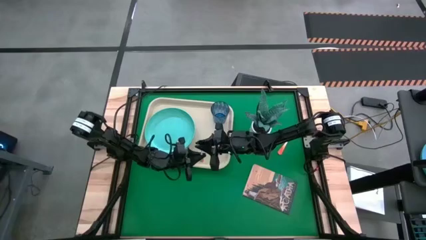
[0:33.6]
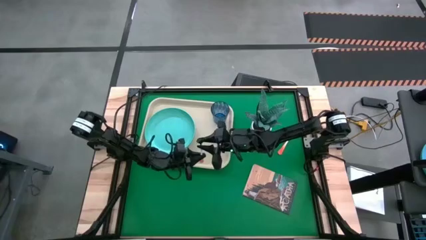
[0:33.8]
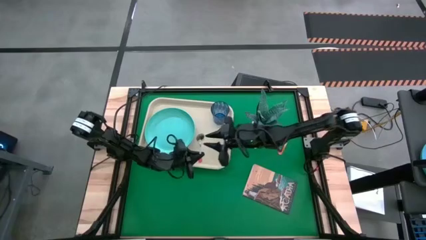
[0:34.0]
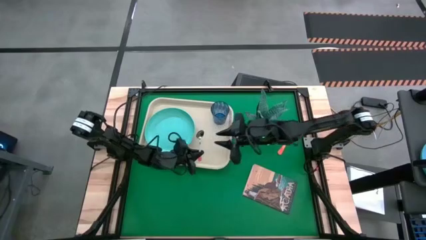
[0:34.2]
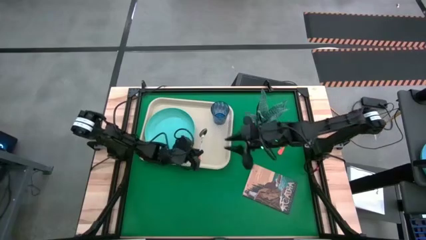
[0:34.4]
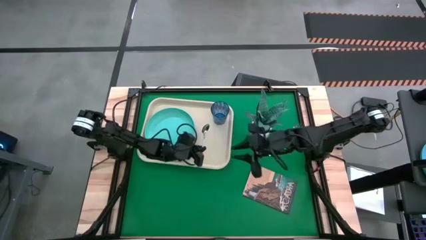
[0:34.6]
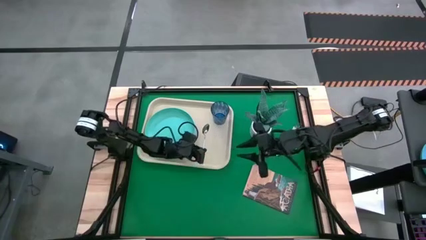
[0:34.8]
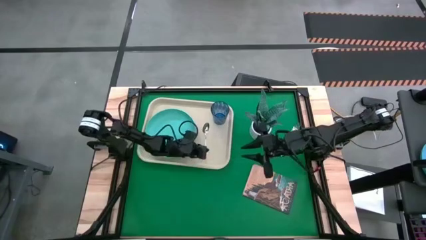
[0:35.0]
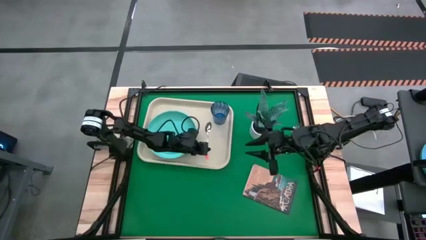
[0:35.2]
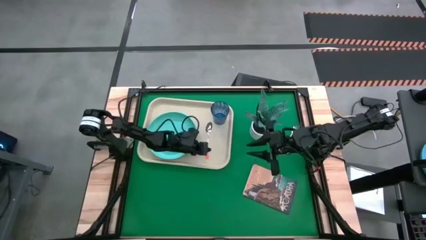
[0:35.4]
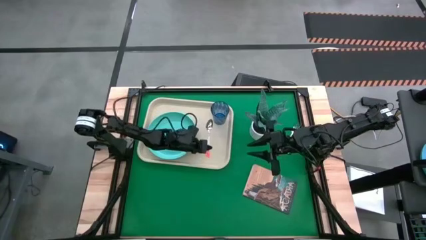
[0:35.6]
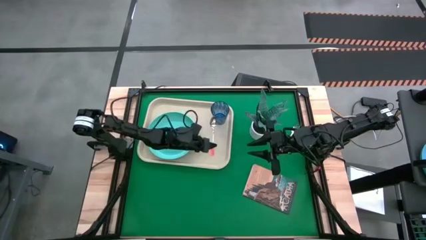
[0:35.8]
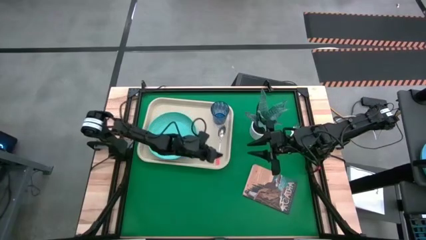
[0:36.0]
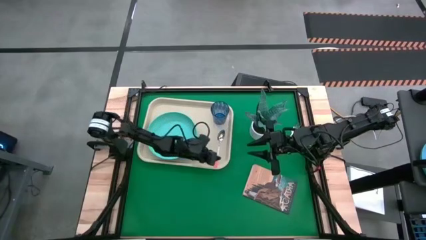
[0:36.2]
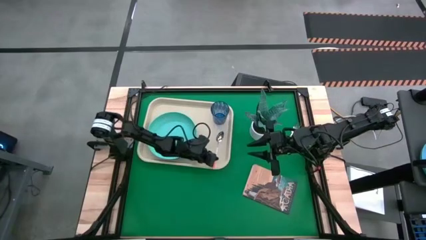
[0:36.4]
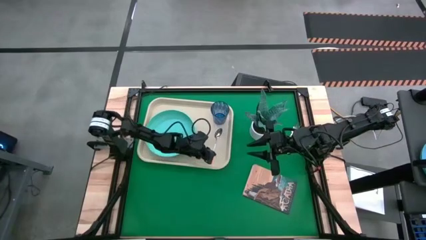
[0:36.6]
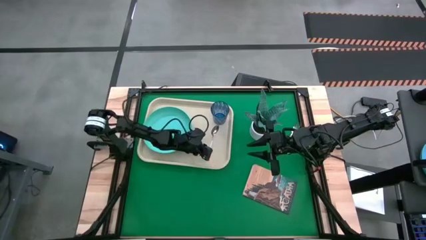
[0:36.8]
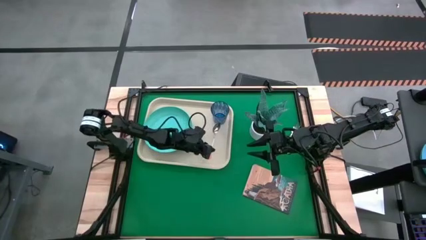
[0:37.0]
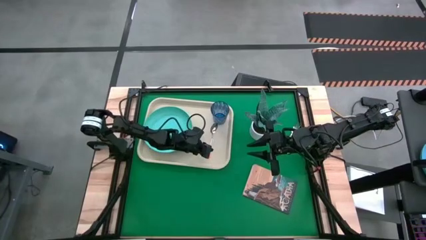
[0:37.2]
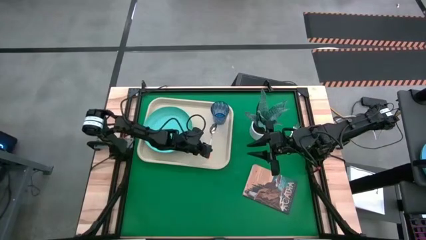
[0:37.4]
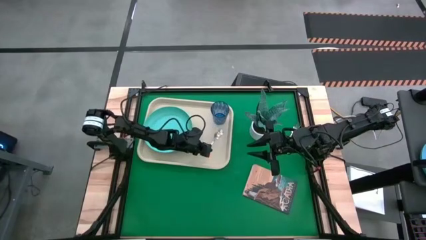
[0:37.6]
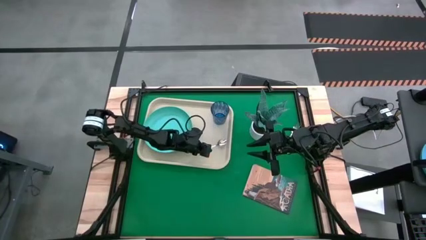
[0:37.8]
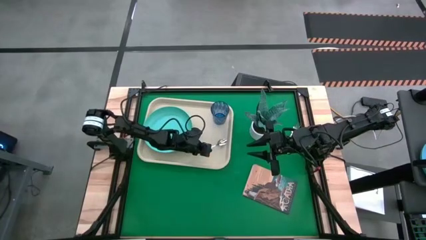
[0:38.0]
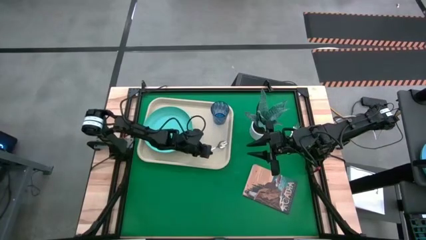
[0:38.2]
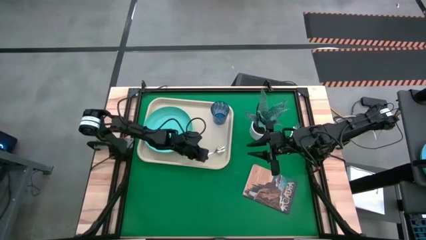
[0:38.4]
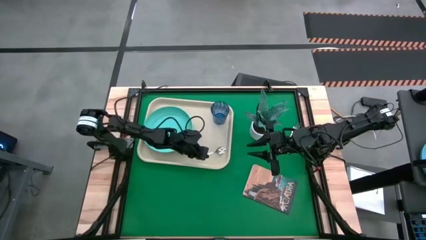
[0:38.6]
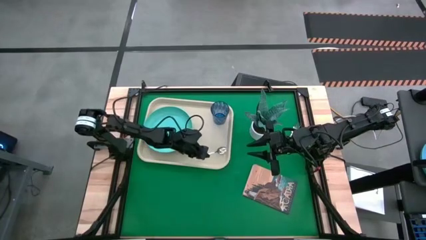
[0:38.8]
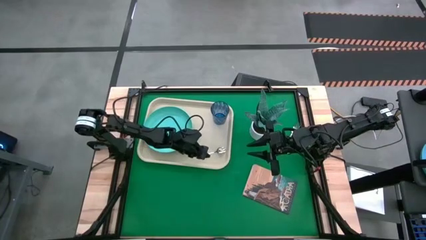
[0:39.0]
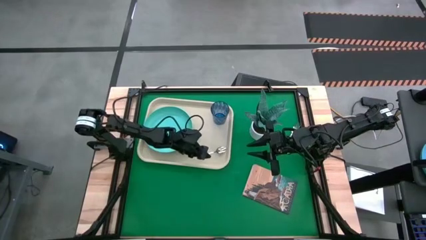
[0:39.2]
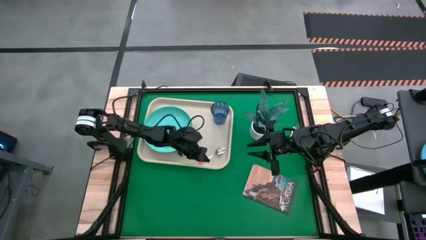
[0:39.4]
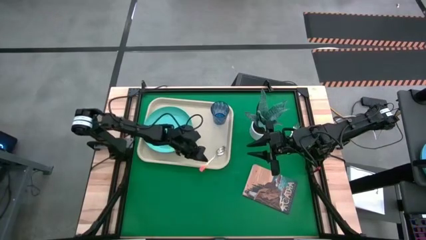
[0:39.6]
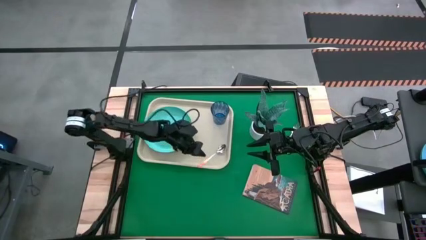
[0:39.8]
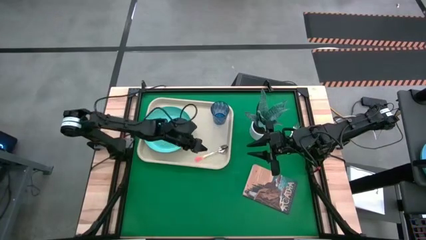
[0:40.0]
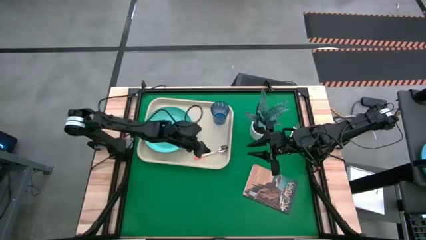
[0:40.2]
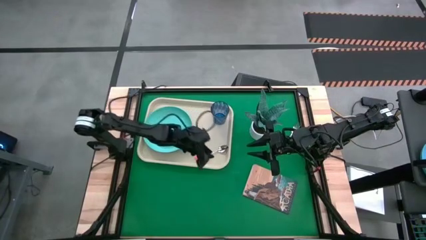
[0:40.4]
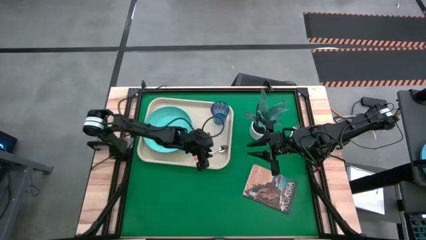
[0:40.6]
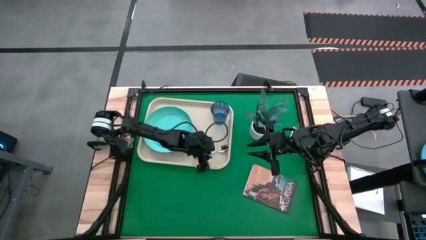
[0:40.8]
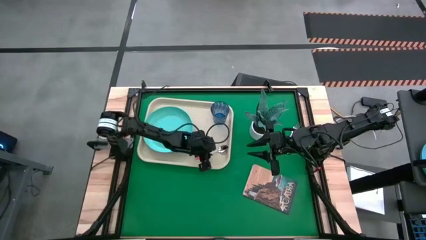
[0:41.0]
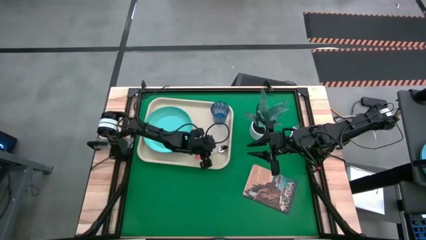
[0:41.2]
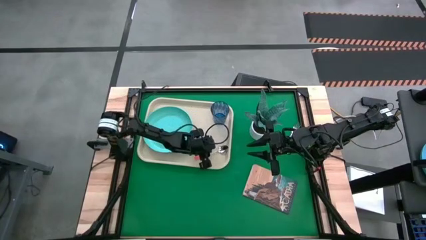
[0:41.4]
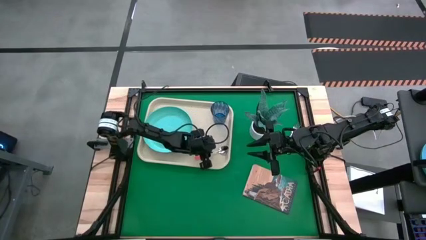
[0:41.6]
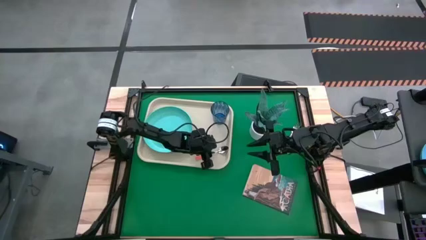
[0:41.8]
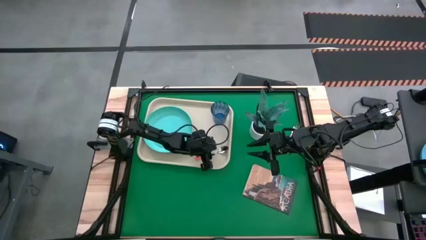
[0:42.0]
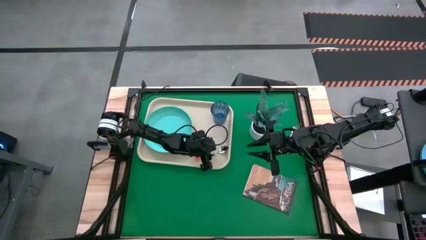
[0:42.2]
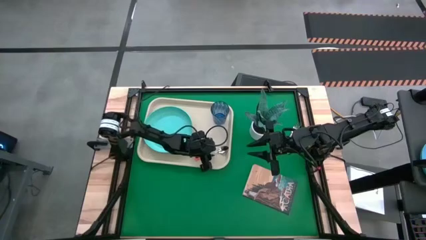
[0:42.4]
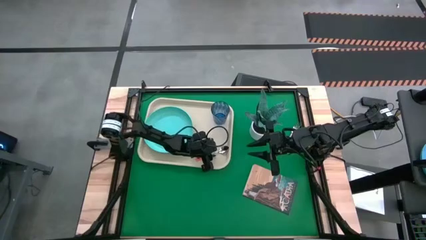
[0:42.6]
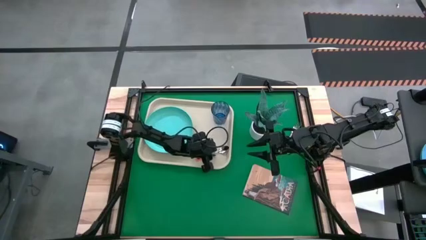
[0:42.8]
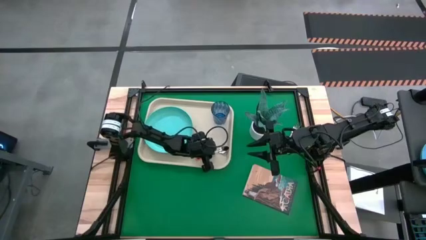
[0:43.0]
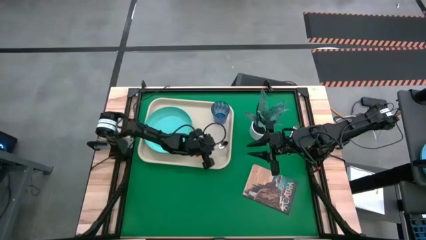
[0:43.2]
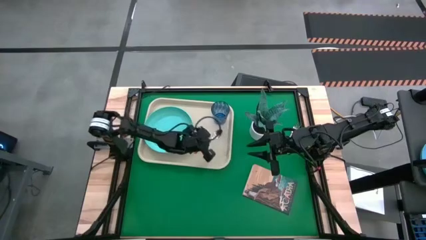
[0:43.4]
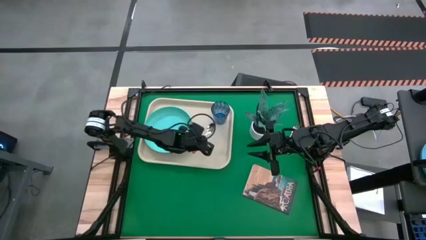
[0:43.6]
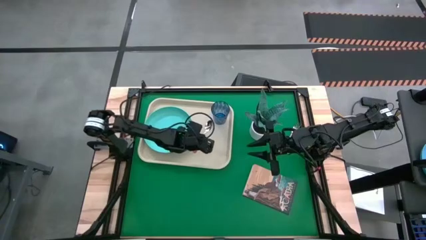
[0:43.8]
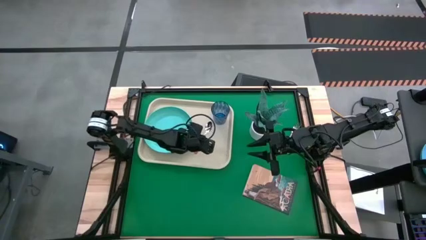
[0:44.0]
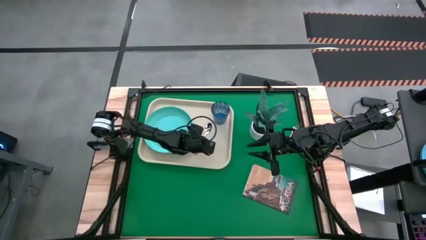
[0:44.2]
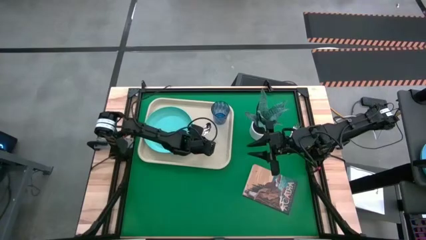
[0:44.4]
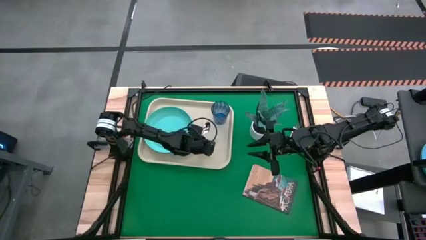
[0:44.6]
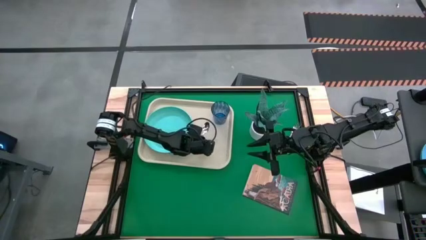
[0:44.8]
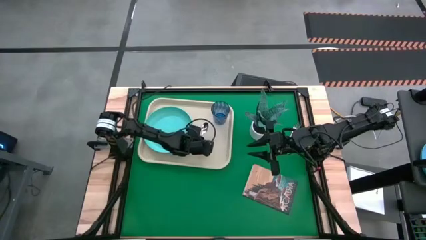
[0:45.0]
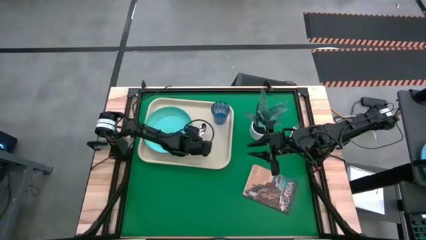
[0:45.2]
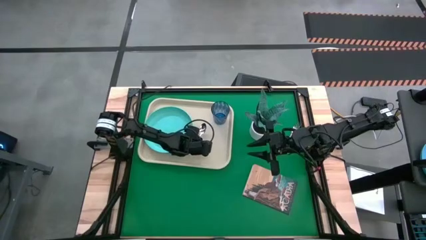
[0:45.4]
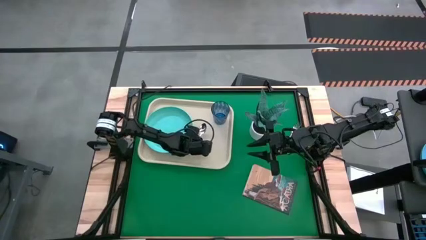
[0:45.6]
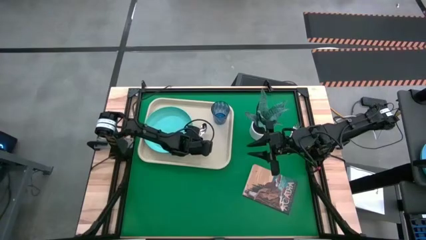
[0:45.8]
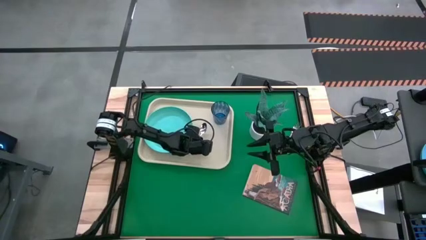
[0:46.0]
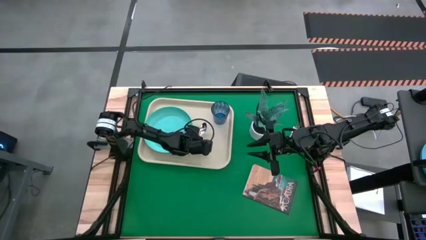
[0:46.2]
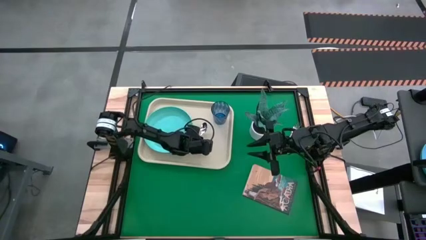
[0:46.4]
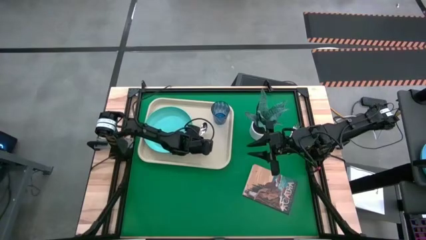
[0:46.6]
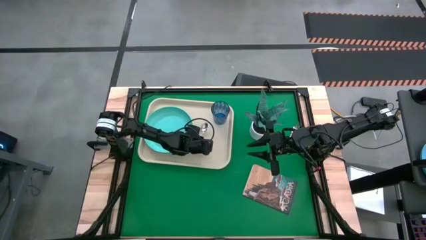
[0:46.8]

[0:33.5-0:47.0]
Task: Pick and place plate/cup/fork/spoon on tray
Put the orange spoon on the gray serving tray
